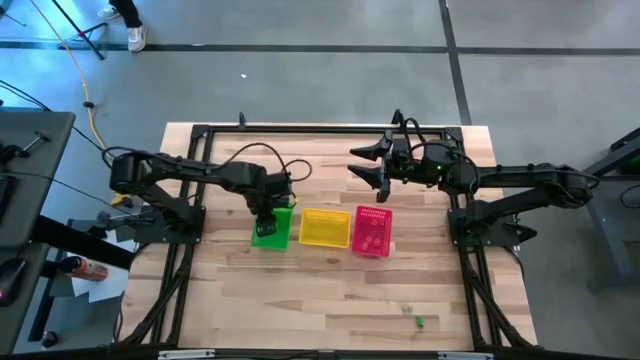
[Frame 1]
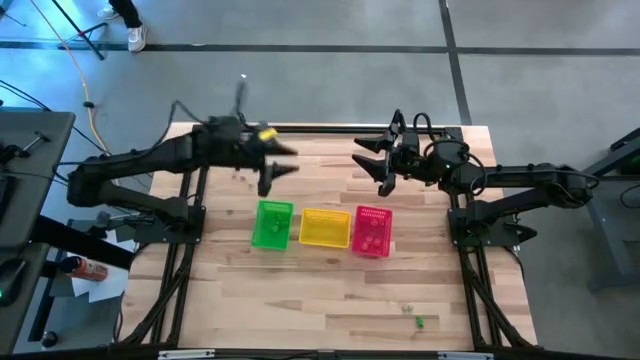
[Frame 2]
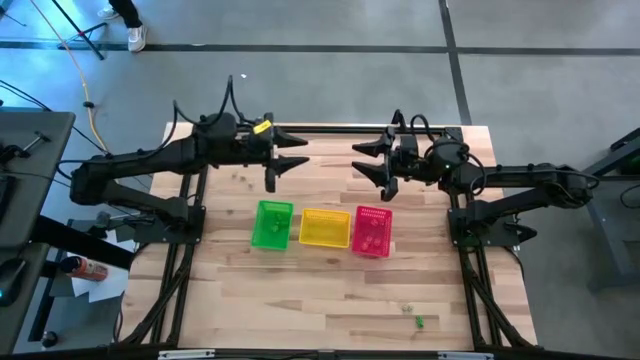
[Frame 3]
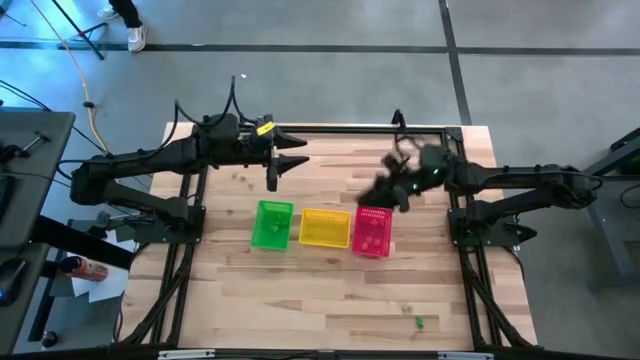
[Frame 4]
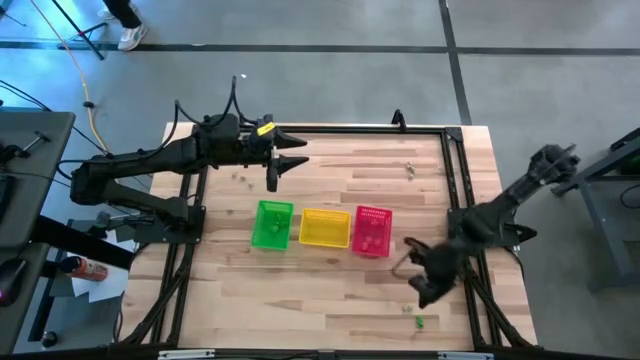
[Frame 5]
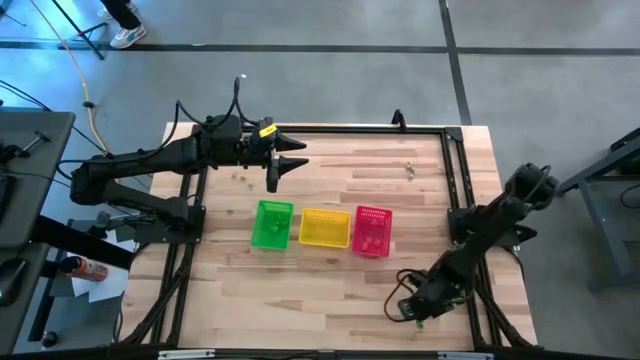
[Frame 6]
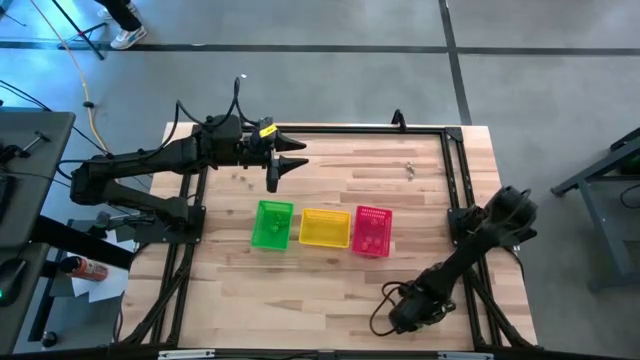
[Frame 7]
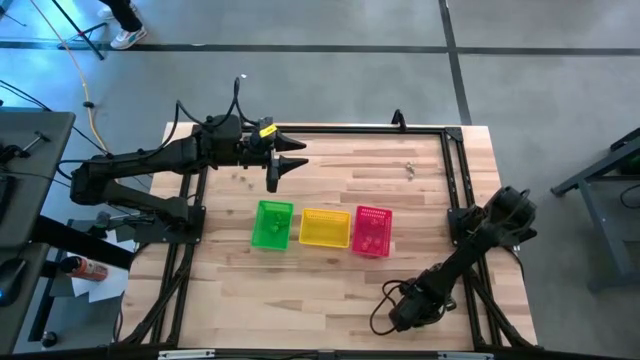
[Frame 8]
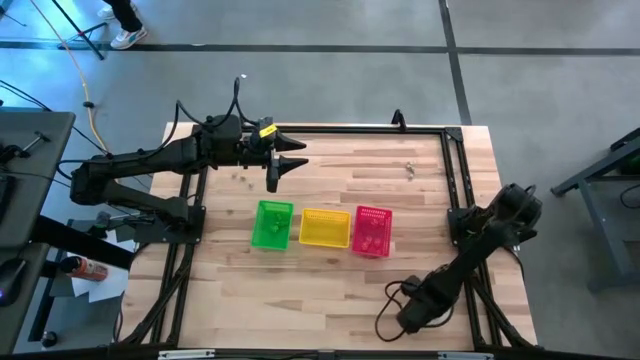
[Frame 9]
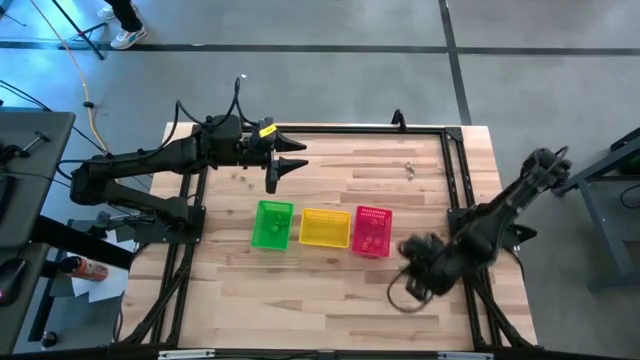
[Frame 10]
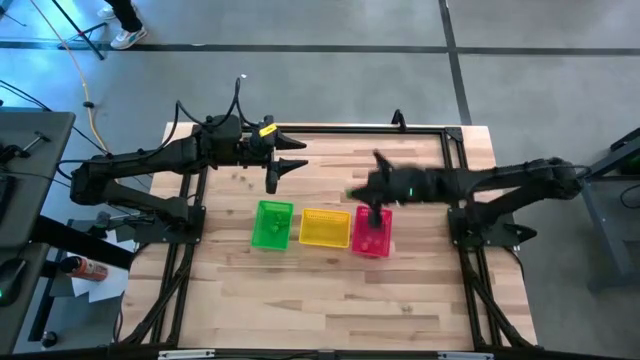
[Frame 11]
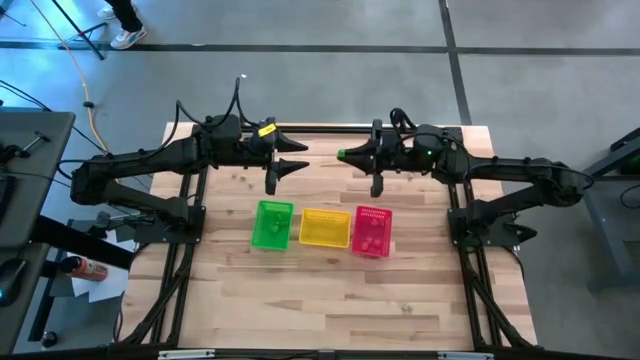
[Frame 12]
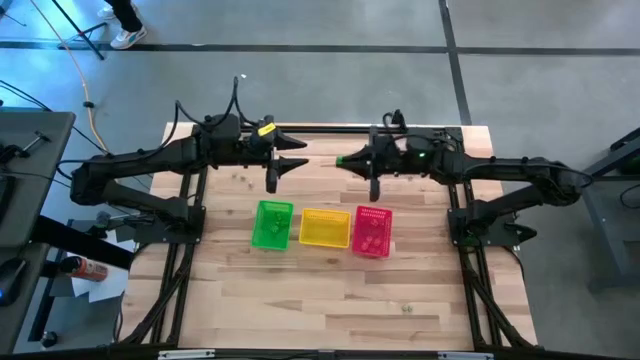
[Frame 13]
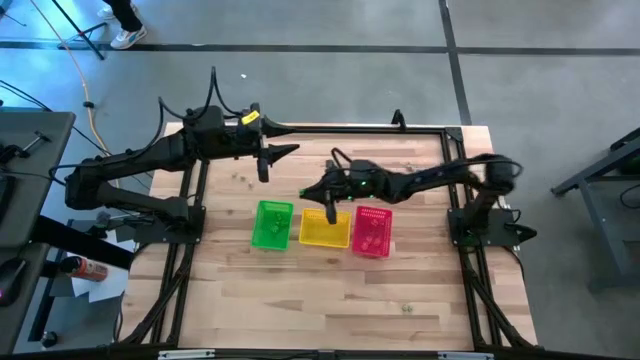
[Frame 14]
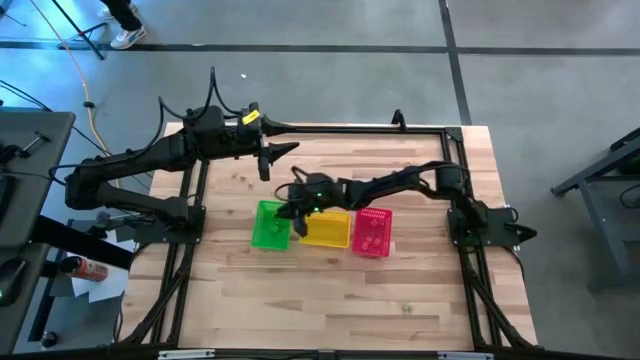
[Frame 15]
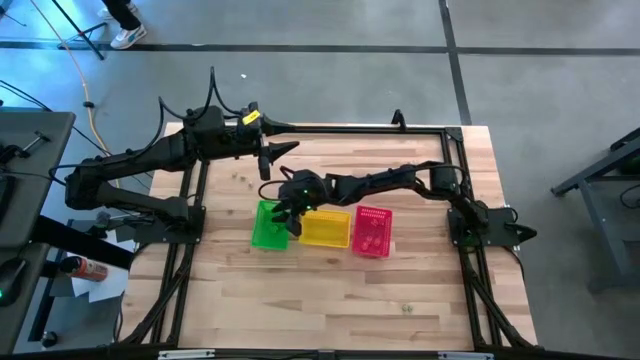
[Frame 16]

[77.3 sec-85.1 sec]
Task: Sort Halloween decoration
Put the green skeleton toy into the green basket

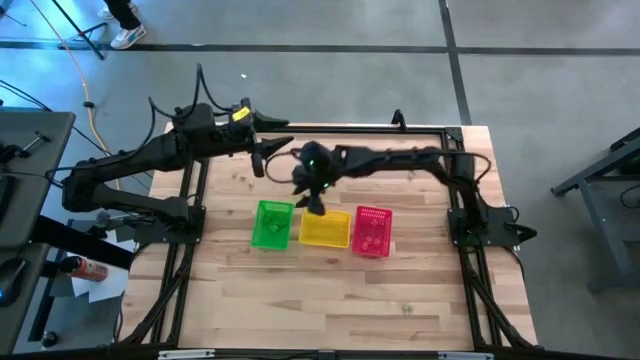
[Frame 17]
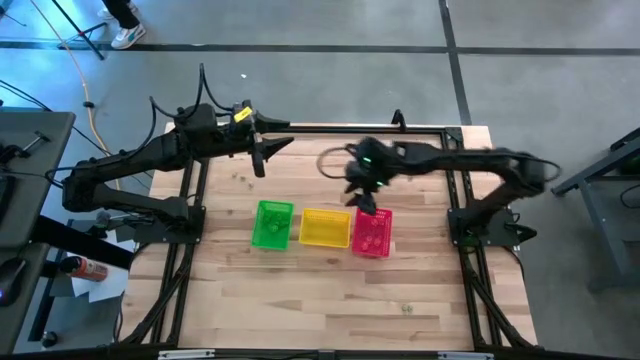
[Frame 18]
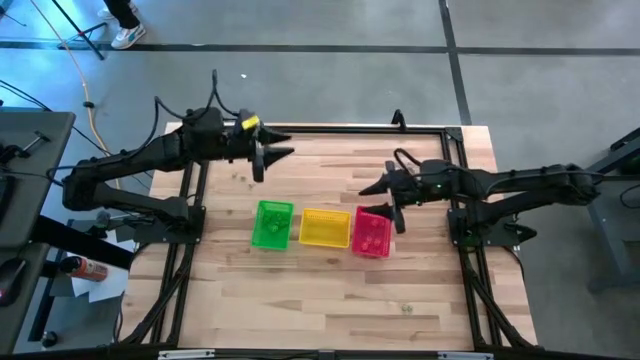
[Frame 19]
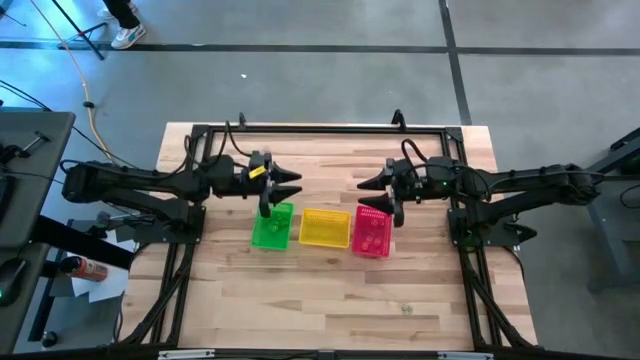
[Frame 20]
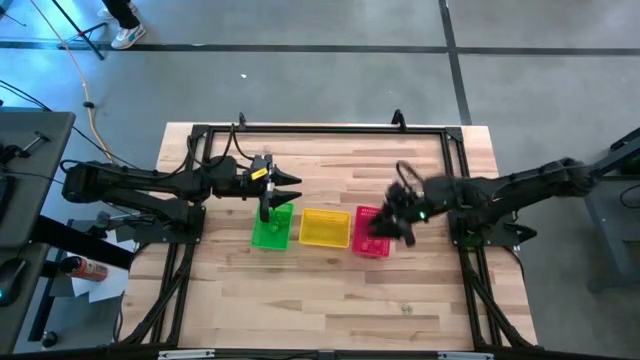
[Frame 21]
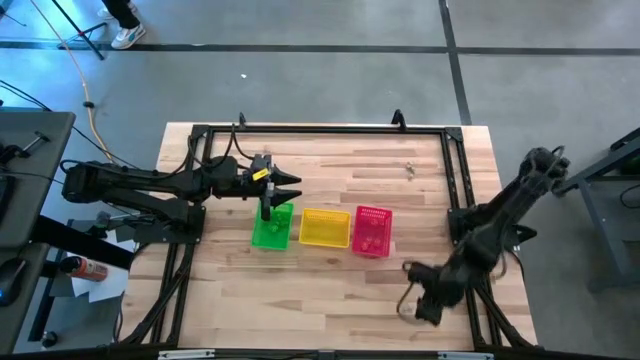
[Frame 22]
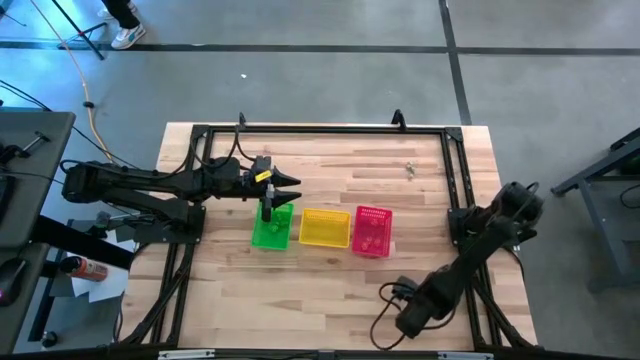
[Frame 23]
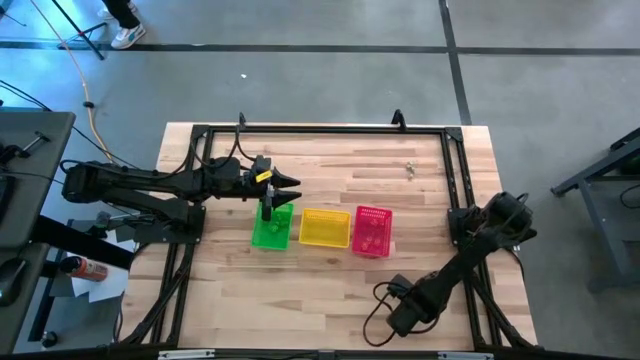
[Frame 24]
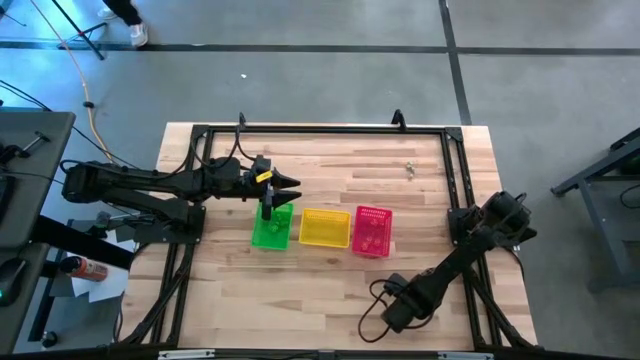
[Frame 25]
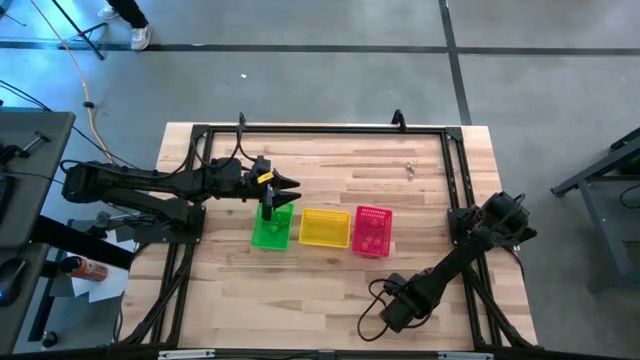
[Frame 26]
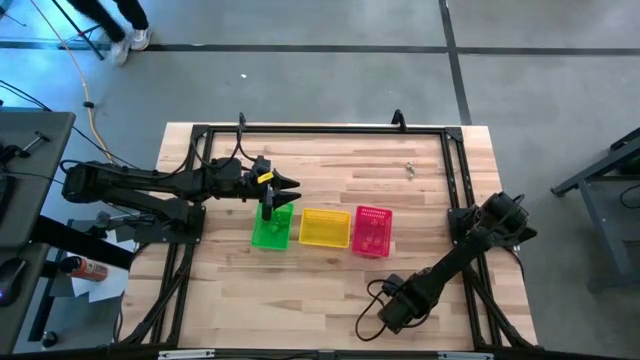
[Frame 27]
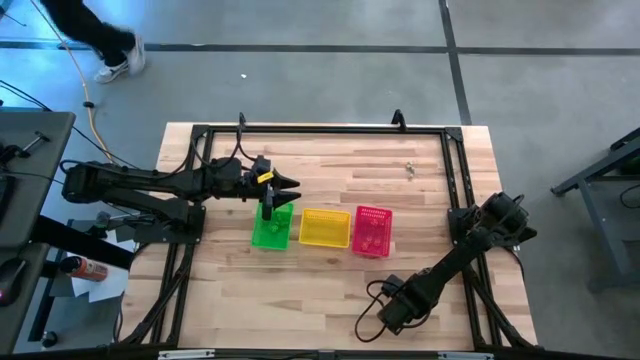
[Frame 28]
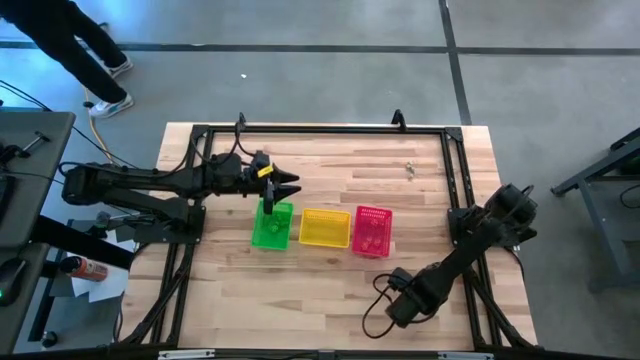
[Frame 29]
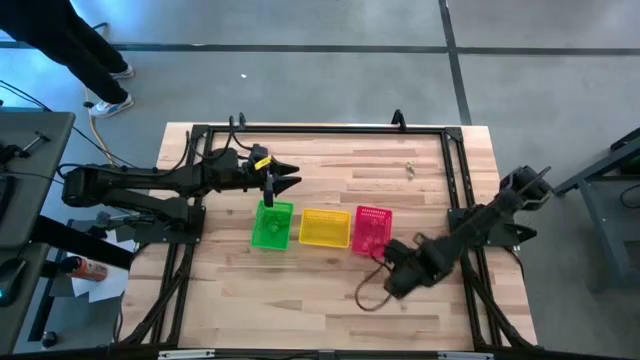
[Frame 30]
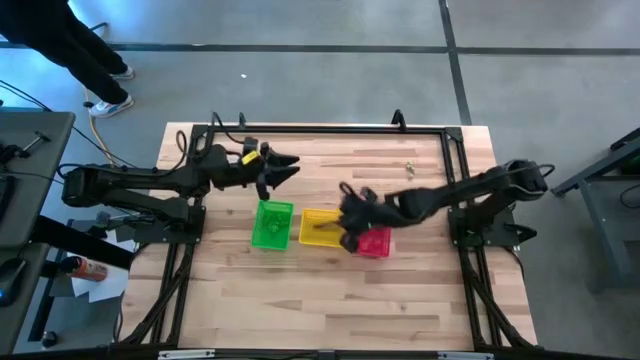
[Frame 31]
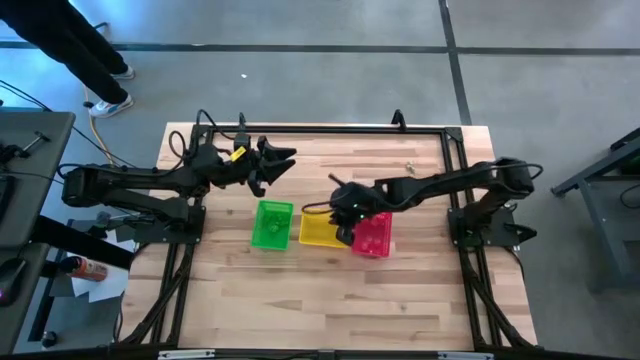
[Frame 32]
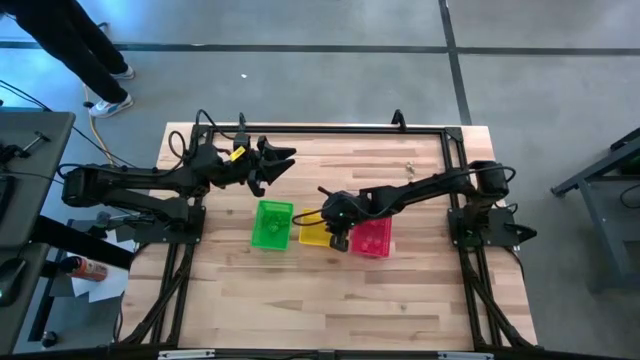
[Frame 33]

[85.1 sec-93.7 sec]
Put the white skull toy into the yellow basket

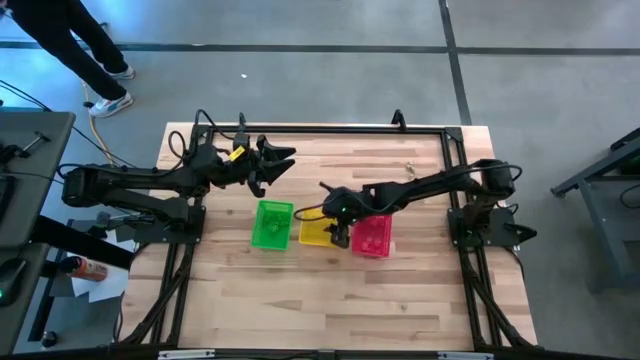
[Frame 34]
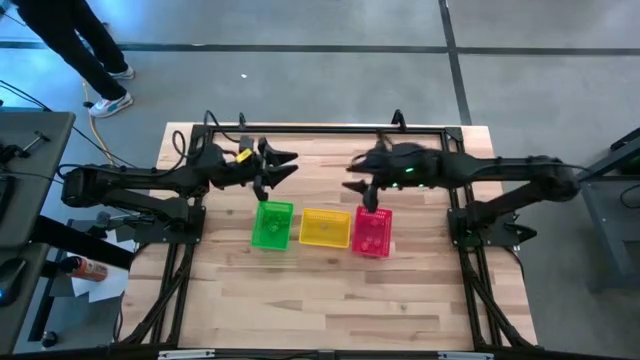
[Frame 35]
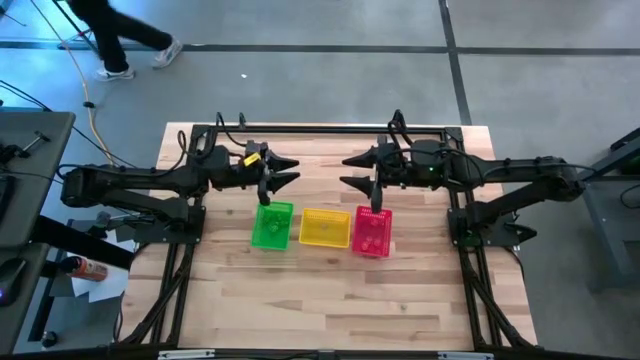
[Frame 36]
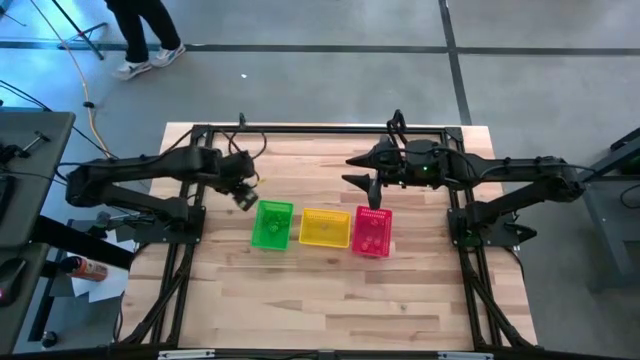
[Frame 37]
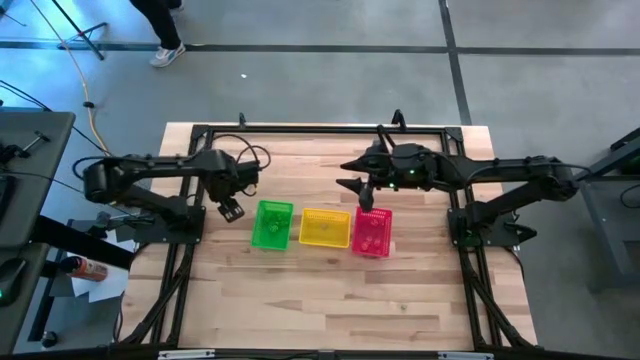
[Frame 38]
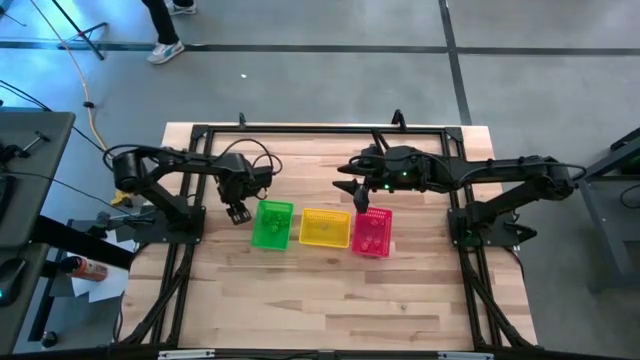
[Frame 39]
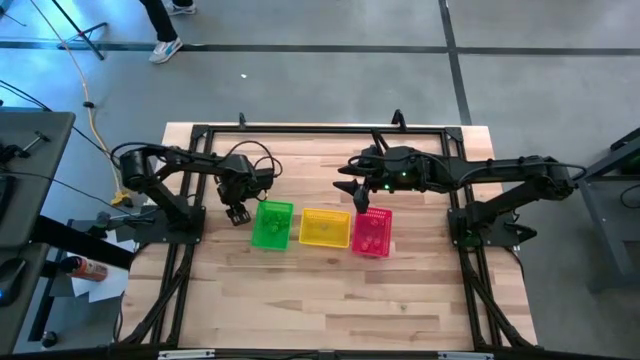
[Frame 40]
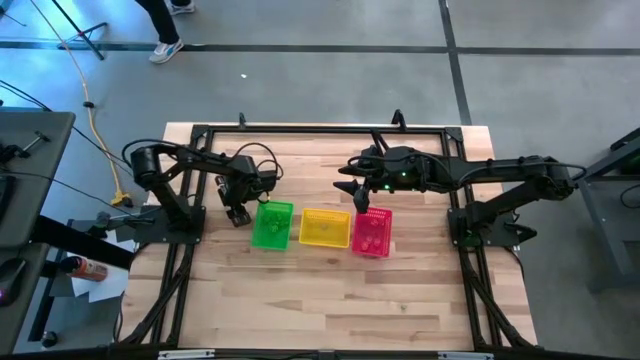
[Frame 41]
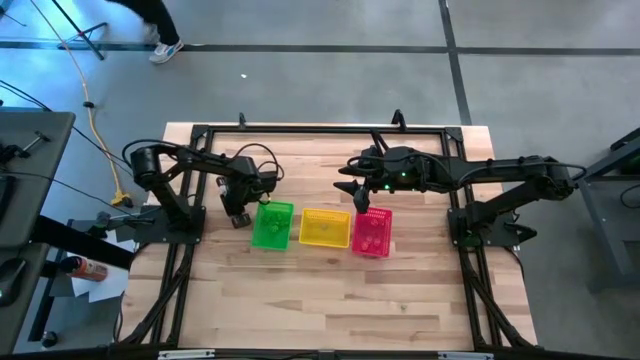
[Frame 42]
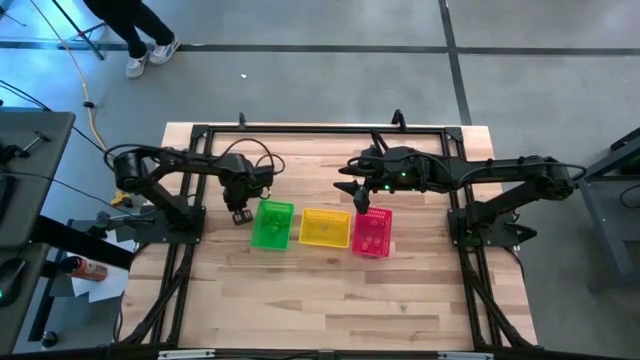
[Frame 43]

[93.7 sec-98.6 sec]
Put the white skull toy into the yellow basket
